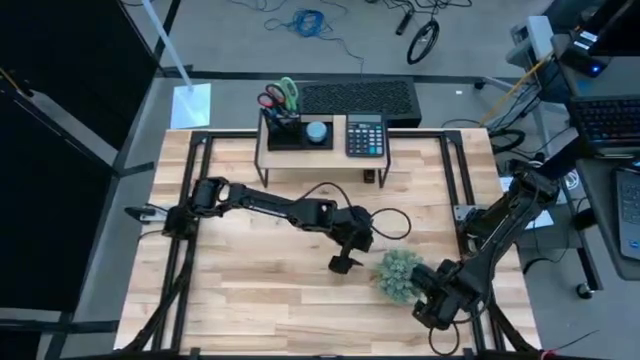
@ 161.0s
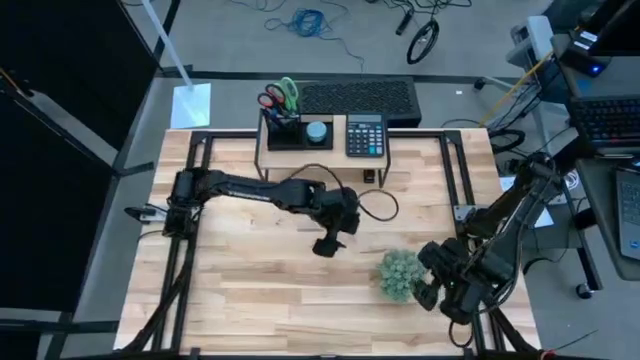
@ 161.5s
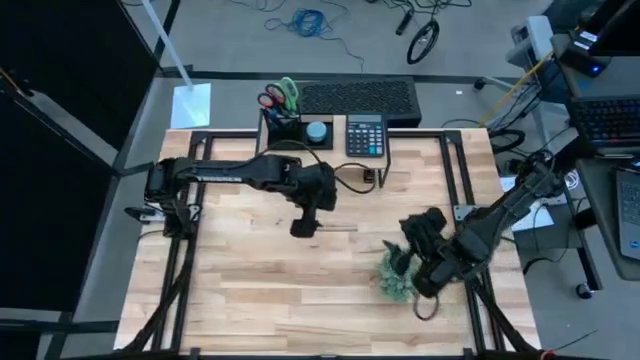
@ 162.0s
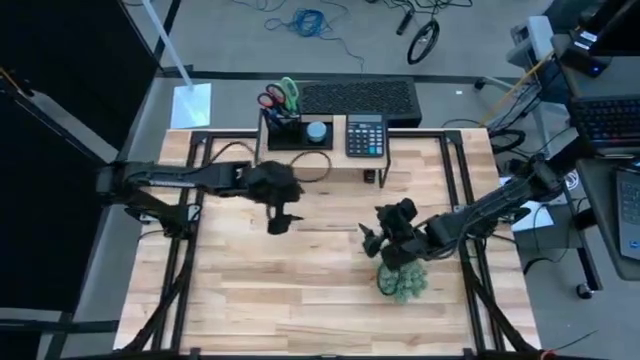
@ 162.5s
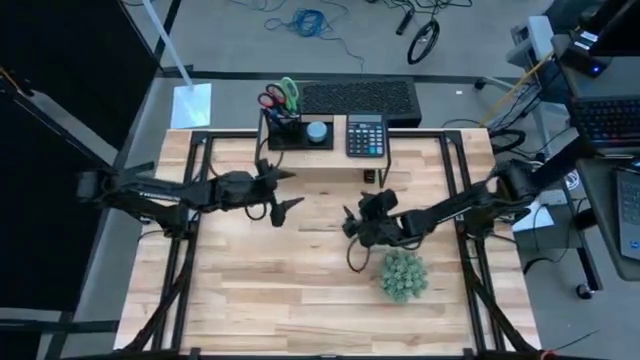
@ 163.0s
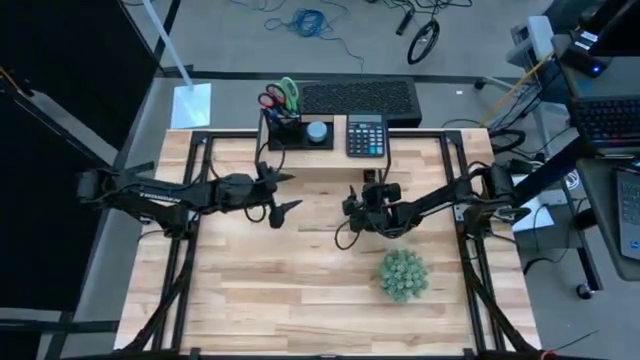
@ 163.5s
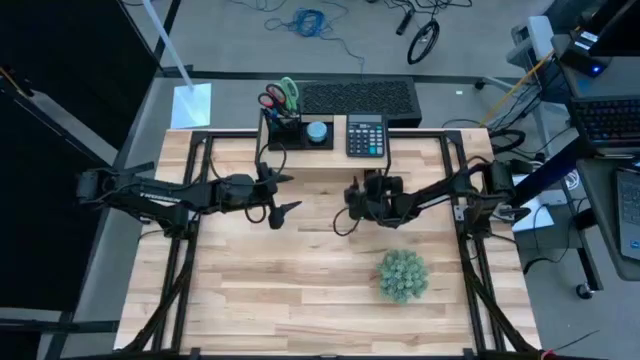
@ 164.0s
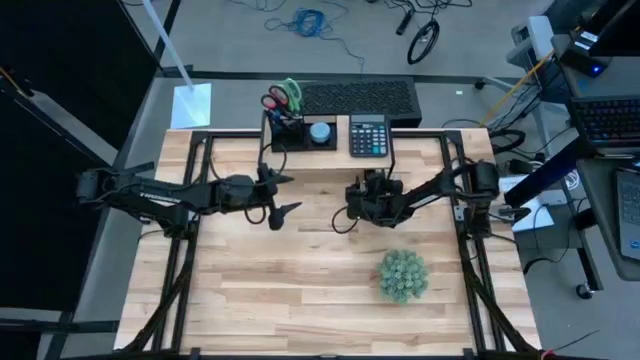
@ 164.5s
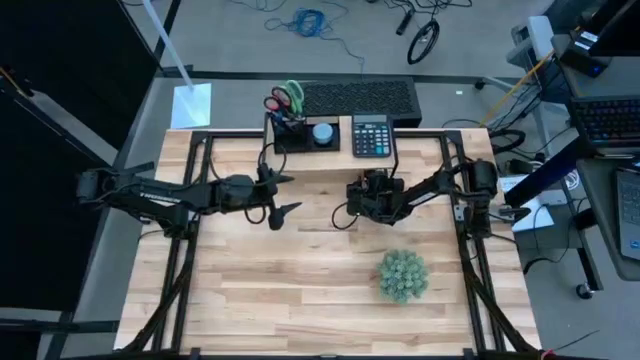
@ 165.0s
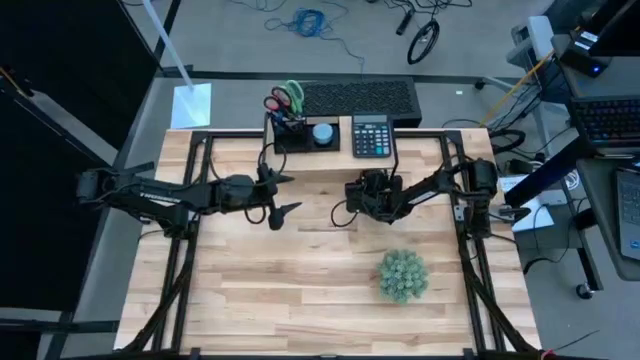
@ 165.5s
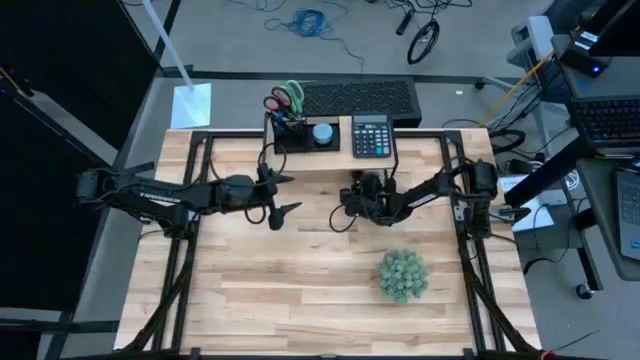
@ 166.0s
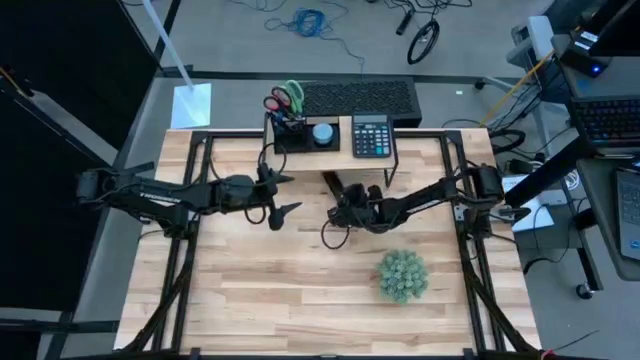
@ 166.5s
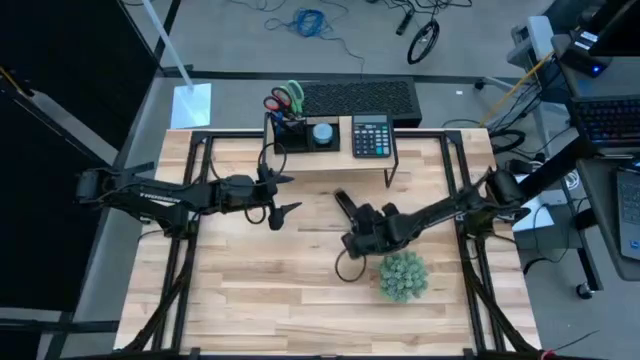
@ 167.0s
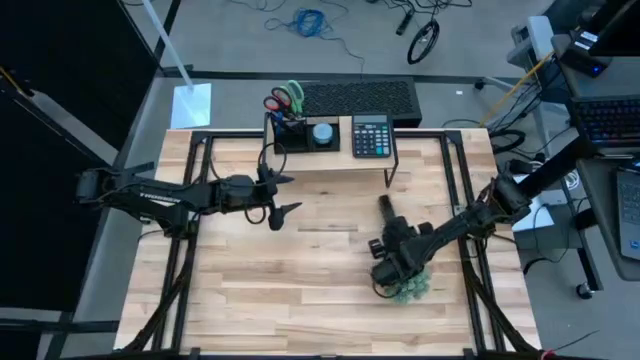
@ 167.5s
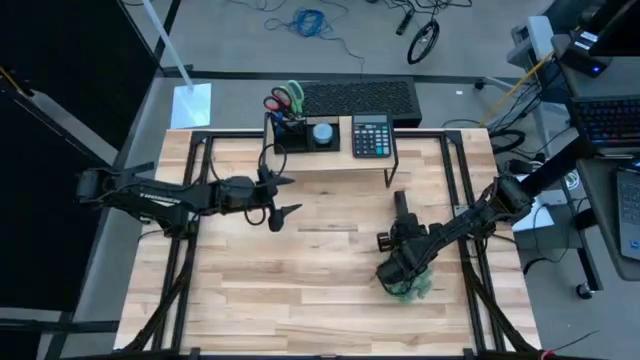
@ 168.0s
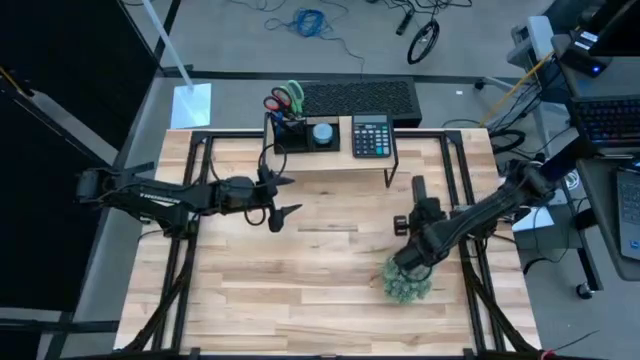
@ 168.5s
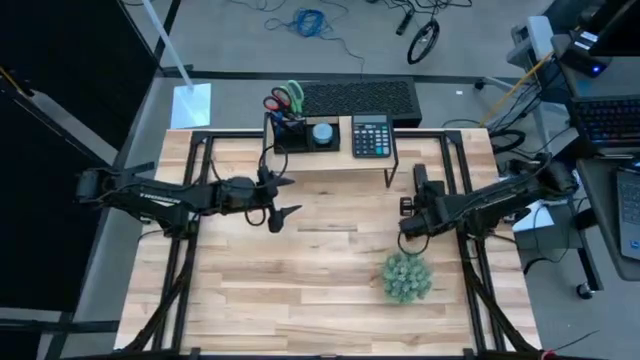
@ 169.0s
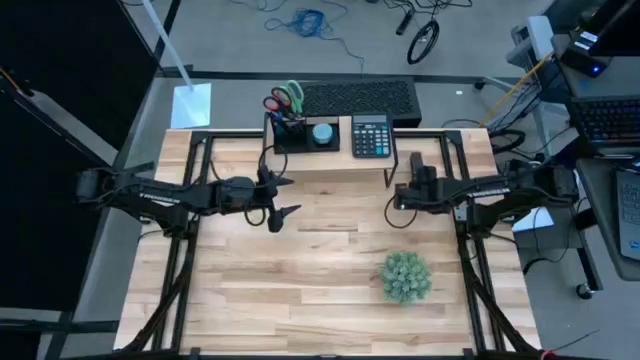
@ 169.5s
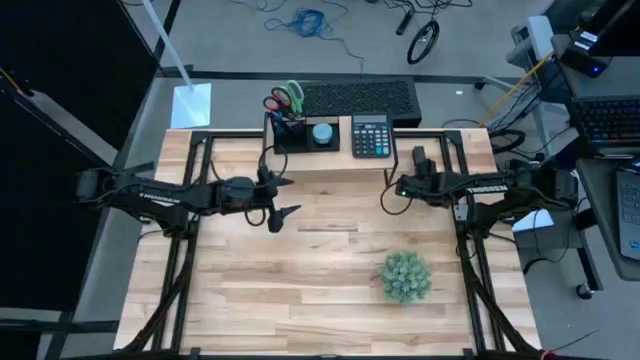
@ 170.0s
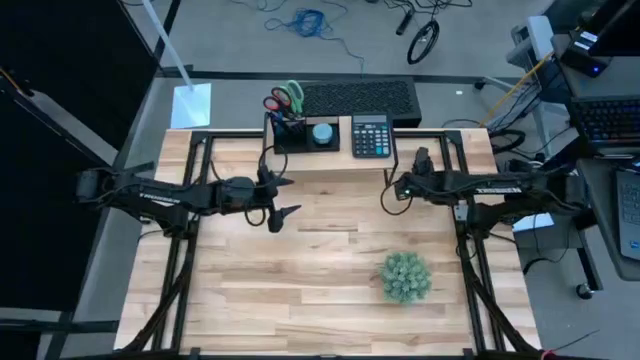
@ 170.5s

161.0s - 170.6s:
Task: Pick and place office supplies into organizer
Remove the stapler from under the shelf

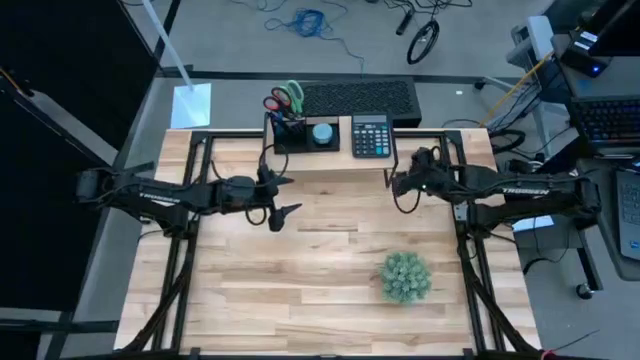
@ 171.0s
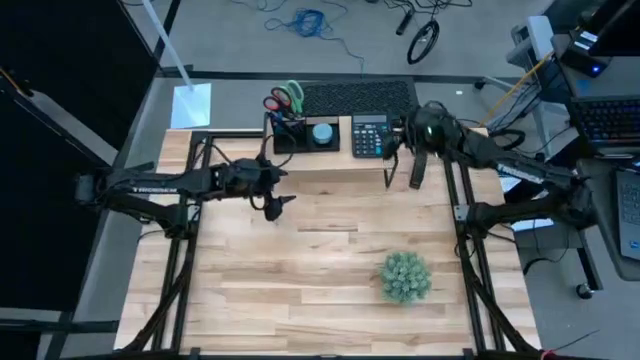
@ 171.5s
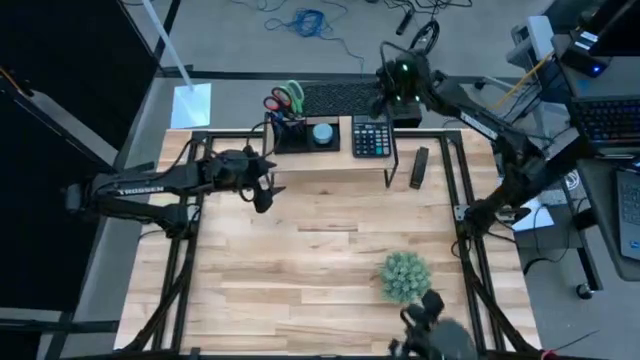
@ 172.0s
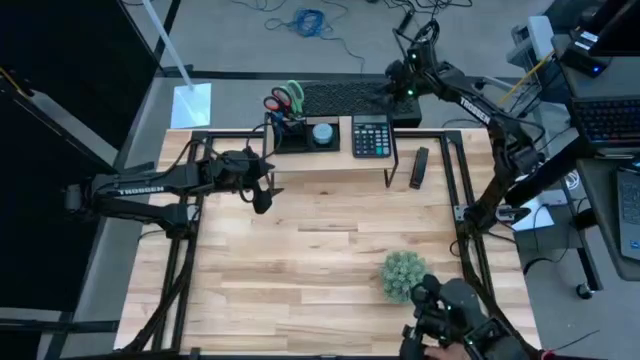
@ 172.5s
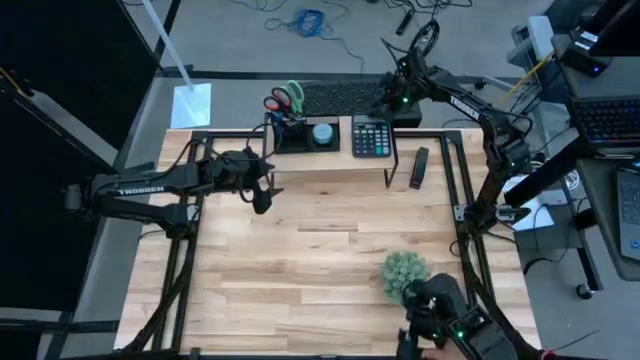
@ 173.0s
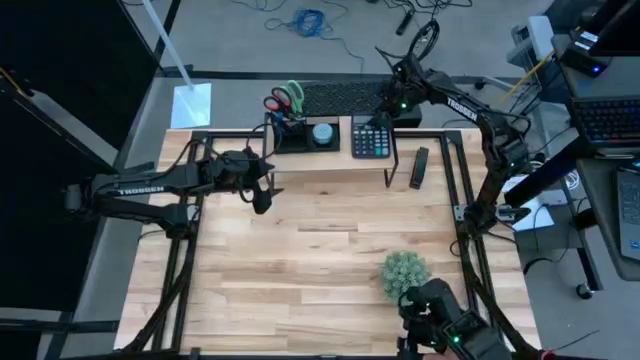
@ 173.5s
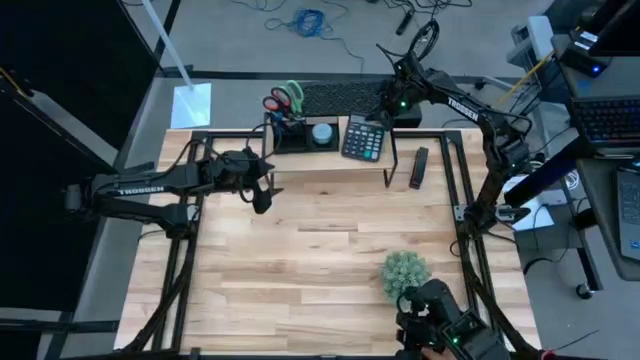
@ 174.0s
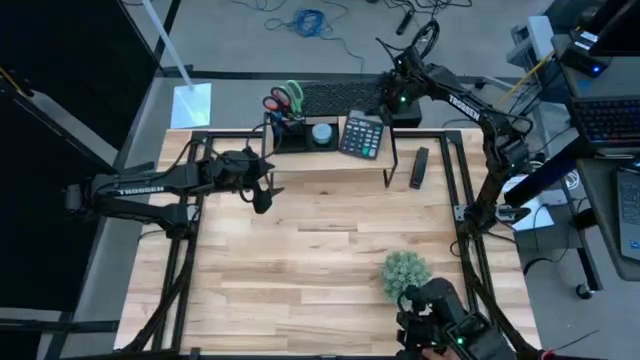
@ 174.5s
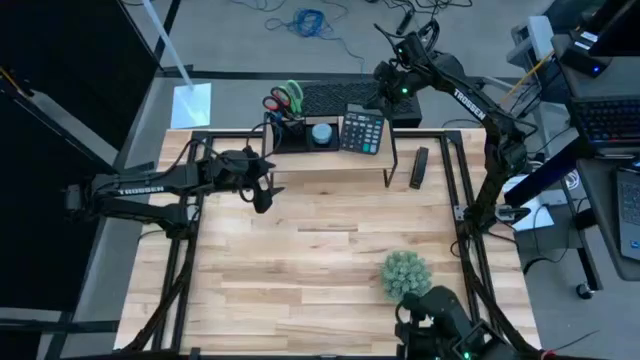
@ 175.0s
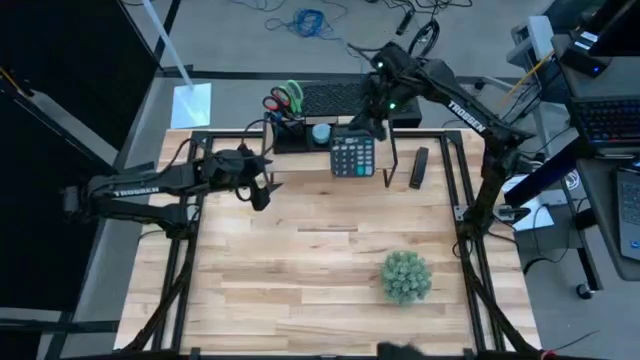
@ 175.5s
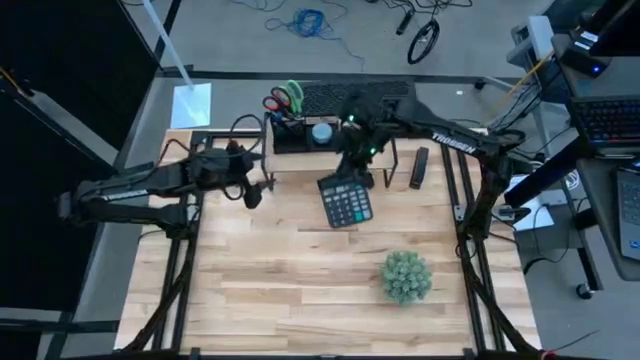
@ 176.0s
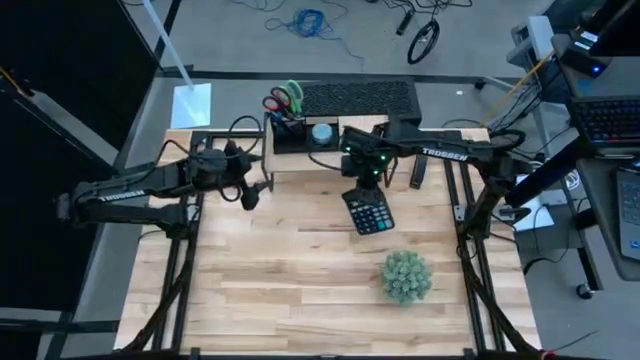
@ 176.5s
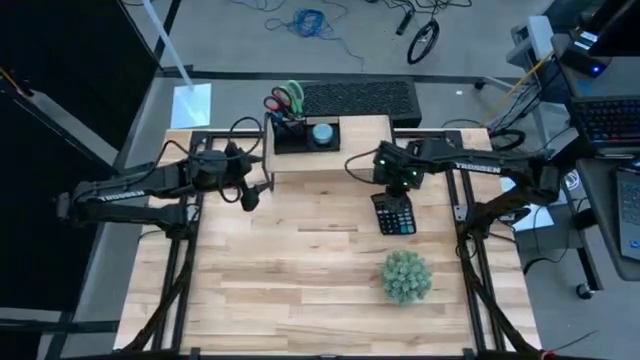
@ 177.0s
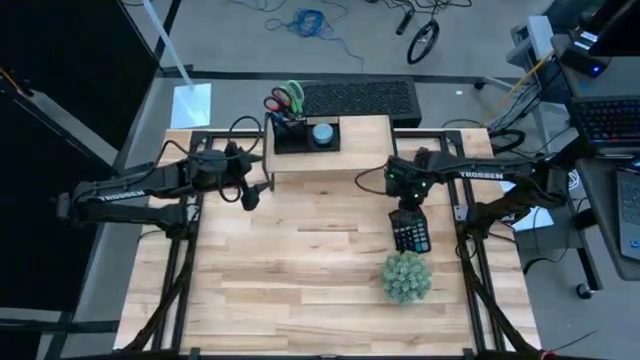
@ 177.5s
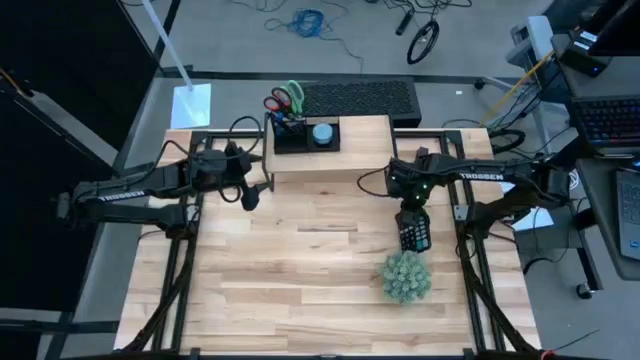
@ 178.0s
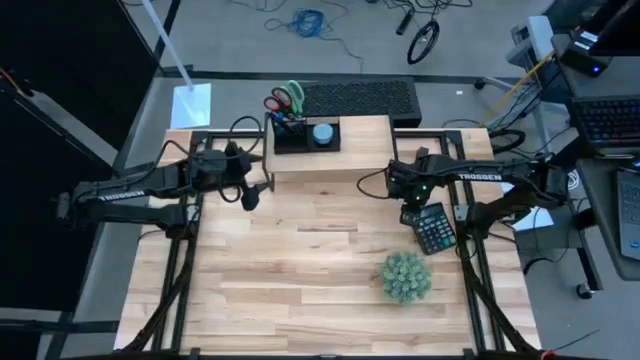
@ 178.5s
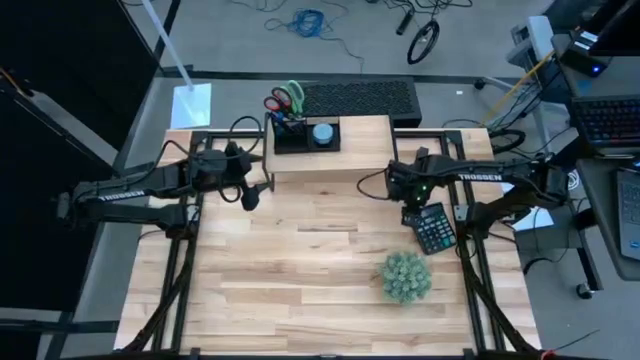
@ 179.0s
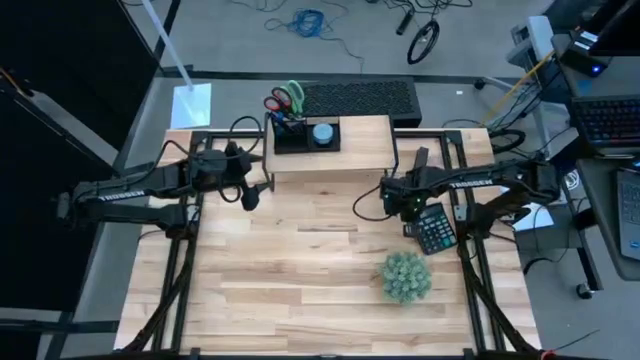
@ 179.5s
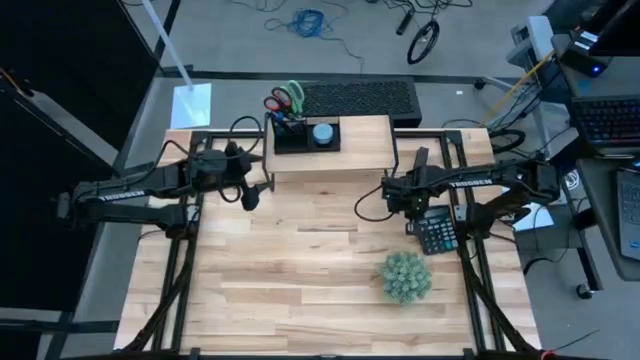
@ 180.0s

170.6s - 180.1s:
Remove the black calculator from the shelf

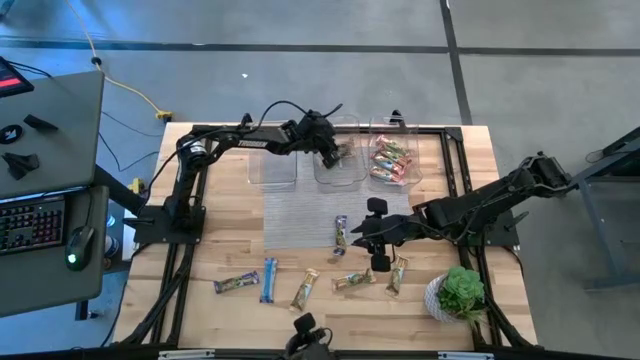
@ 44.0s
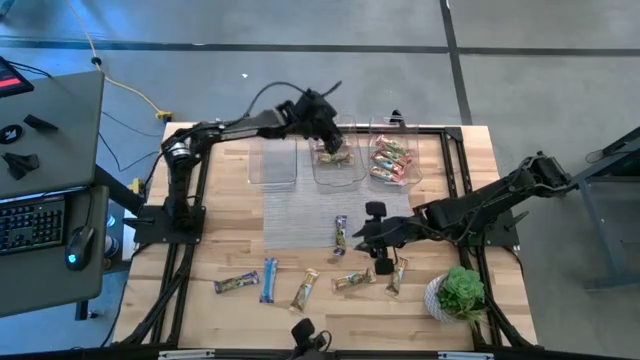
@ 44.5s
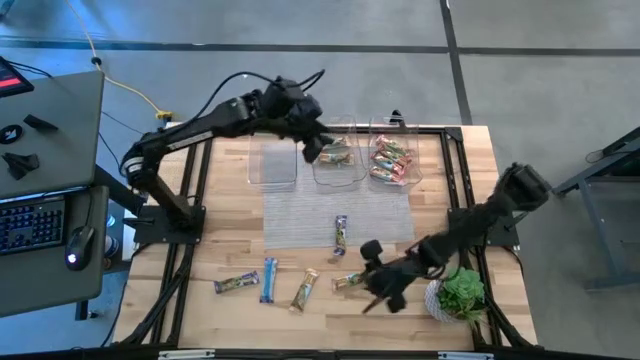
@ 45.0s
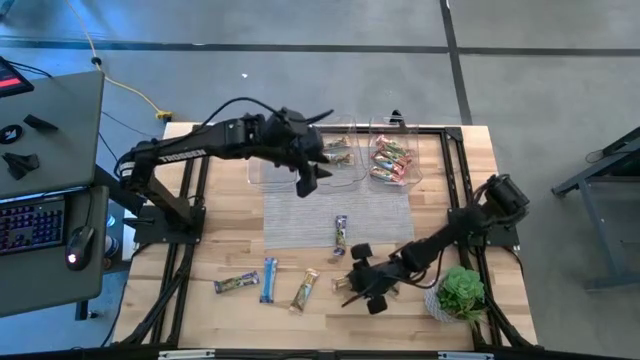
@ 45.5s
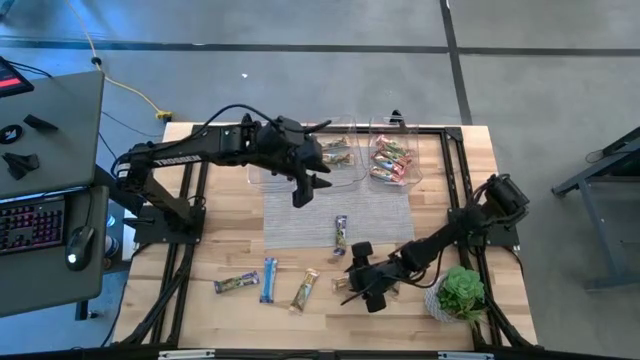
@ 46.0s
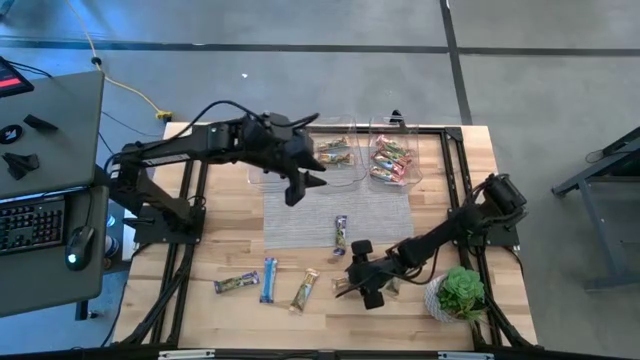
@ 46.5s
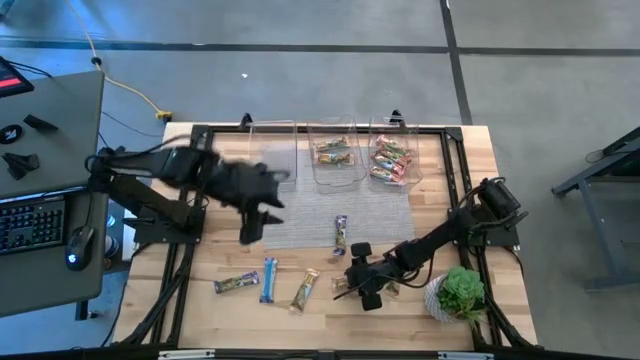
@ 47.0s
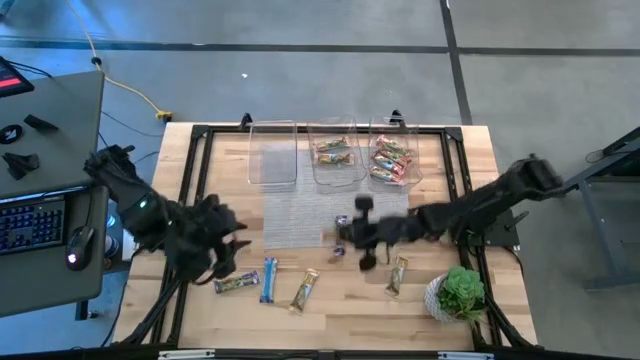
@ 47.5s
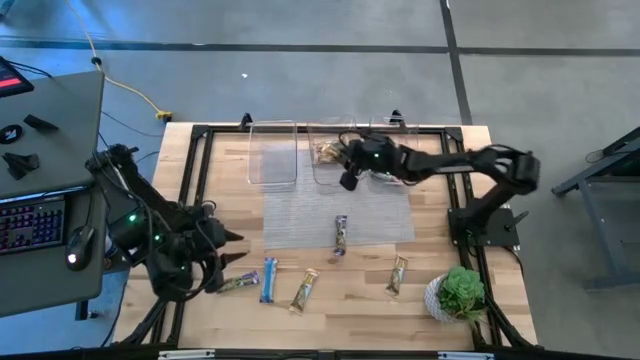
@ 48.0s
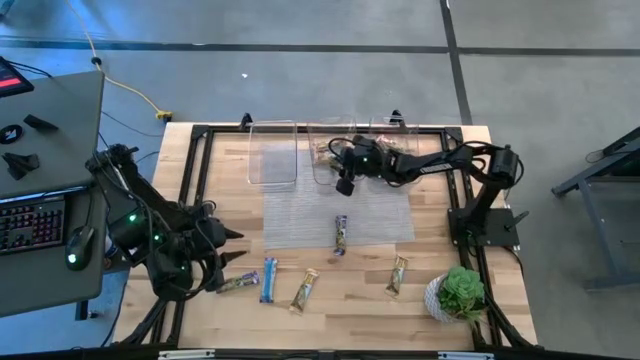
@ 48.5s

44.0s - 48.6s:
Task: Pick and place Granola Bars by type
Put the orange granola bar into the middle transparent bin
